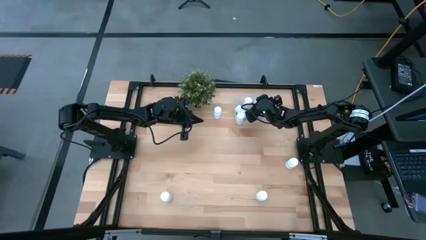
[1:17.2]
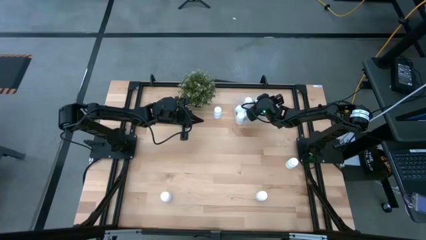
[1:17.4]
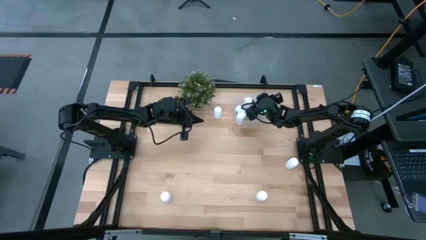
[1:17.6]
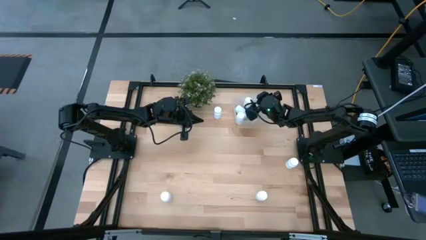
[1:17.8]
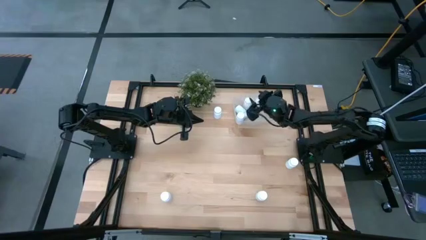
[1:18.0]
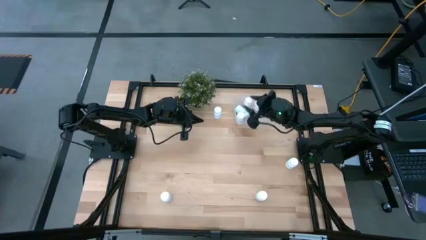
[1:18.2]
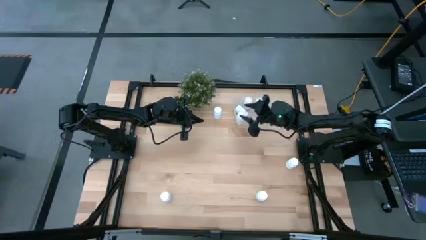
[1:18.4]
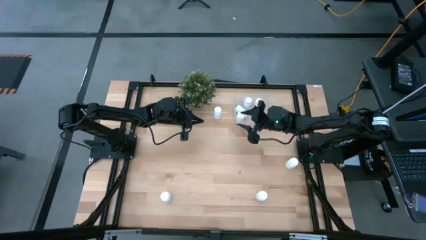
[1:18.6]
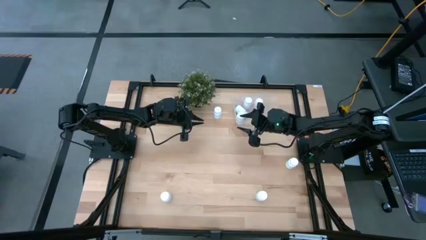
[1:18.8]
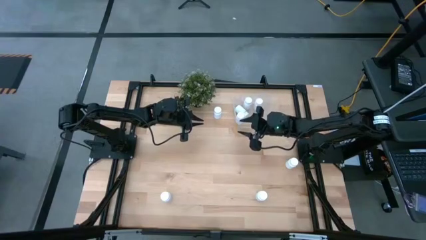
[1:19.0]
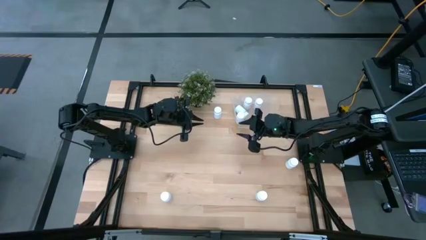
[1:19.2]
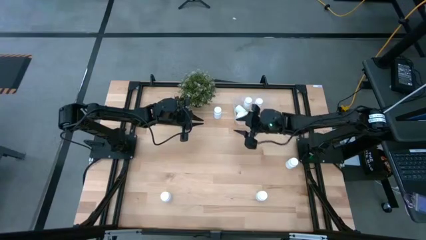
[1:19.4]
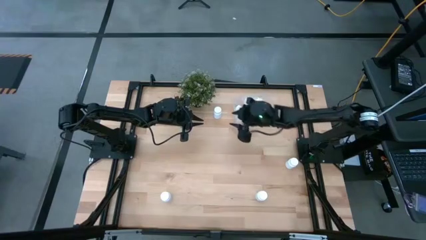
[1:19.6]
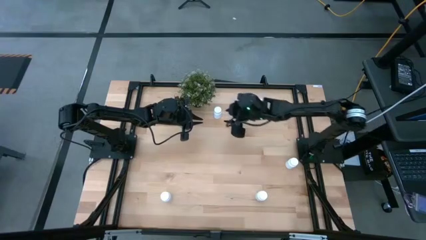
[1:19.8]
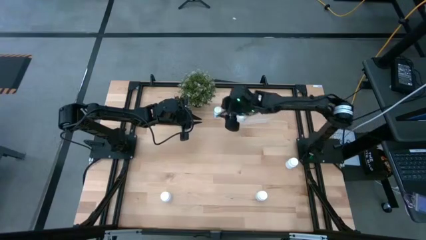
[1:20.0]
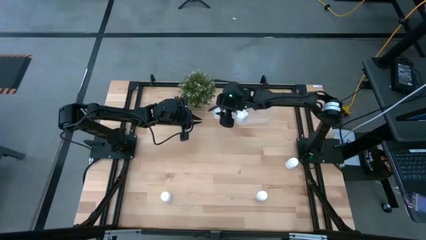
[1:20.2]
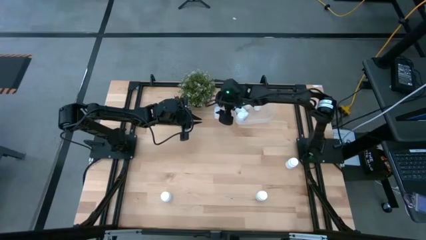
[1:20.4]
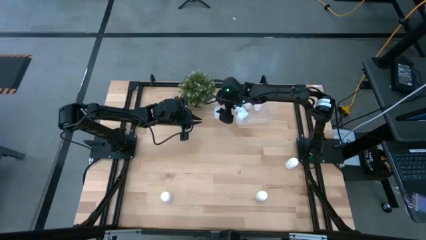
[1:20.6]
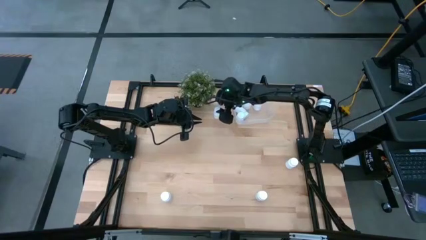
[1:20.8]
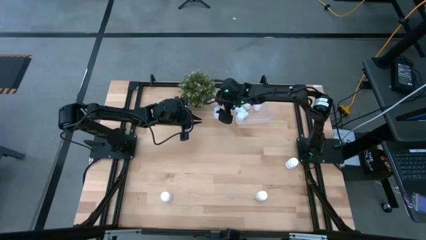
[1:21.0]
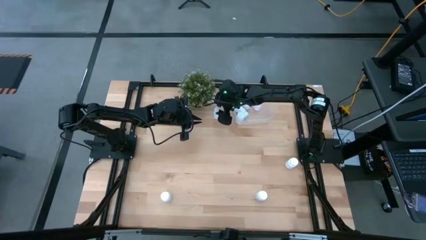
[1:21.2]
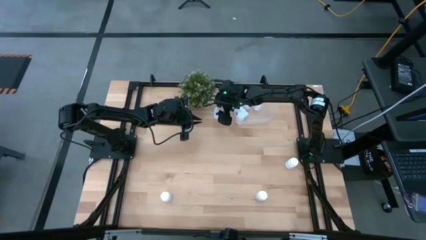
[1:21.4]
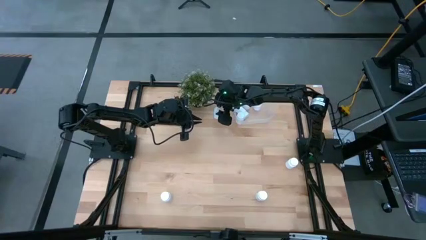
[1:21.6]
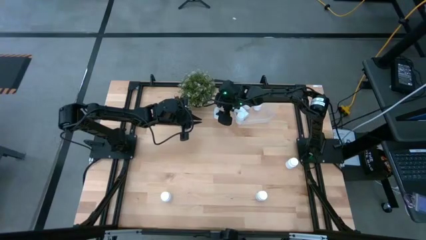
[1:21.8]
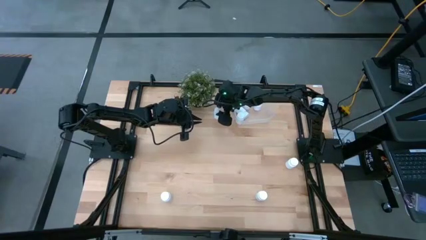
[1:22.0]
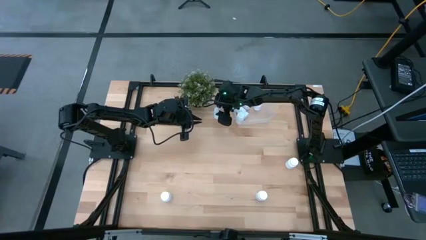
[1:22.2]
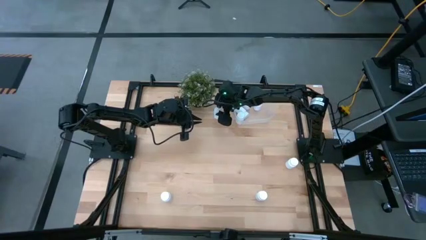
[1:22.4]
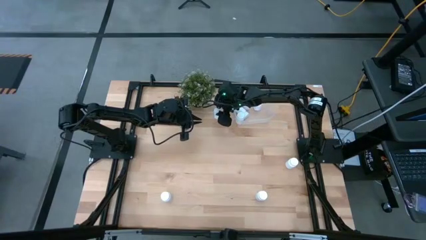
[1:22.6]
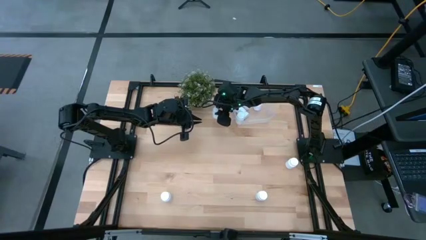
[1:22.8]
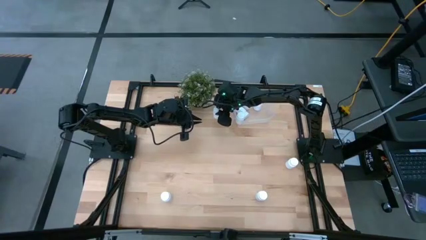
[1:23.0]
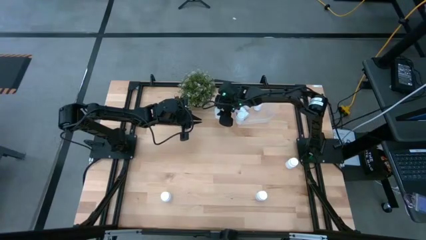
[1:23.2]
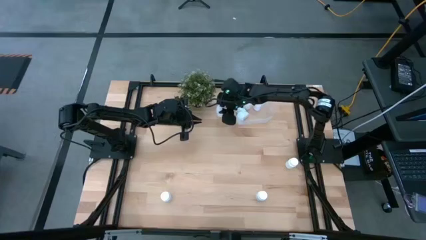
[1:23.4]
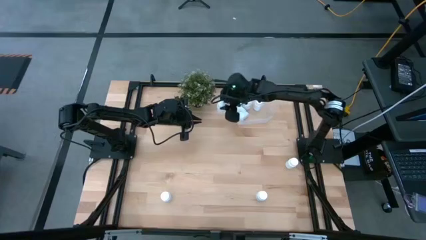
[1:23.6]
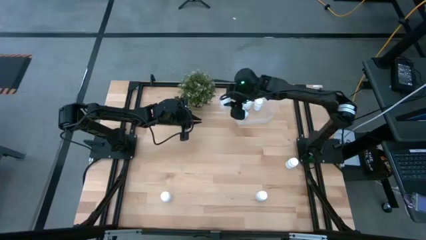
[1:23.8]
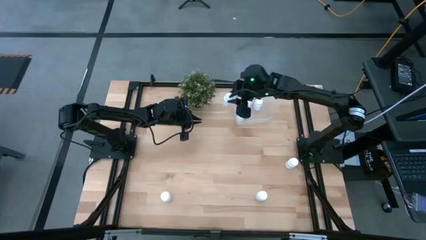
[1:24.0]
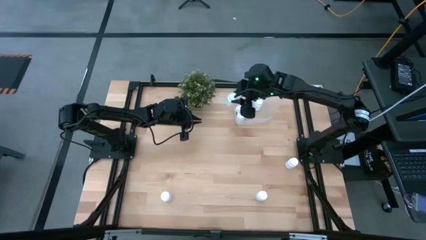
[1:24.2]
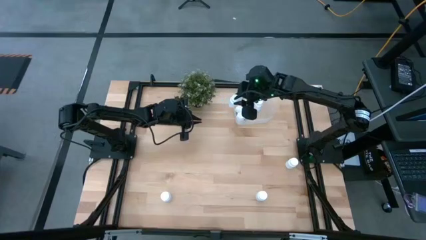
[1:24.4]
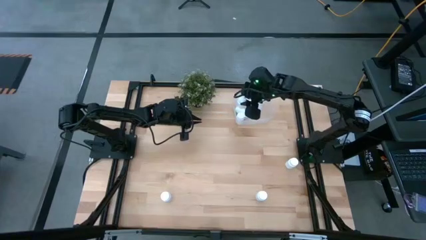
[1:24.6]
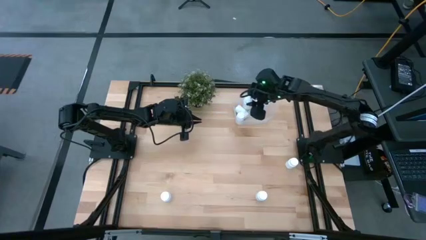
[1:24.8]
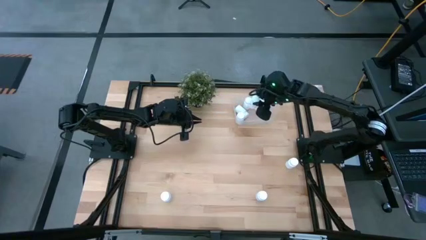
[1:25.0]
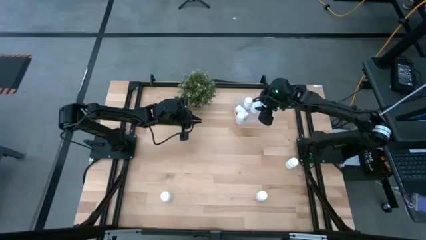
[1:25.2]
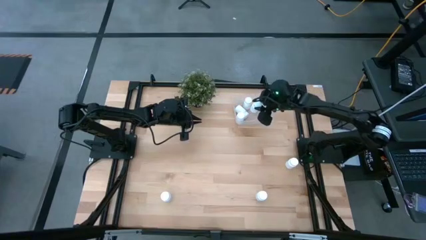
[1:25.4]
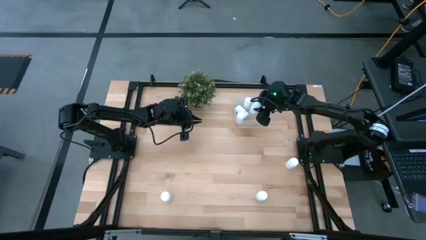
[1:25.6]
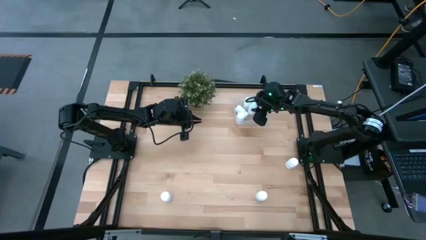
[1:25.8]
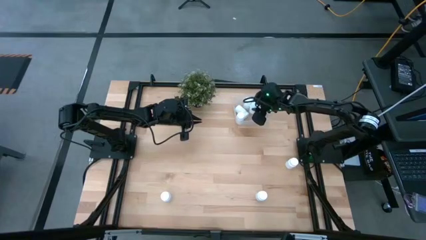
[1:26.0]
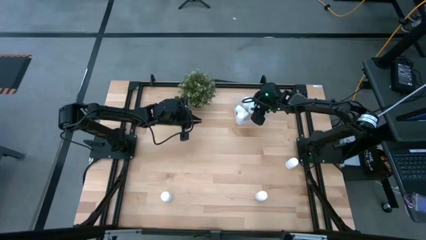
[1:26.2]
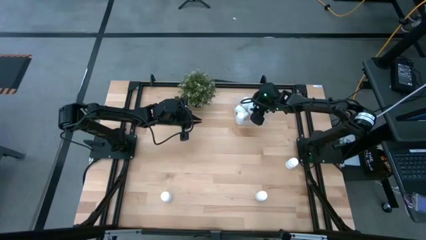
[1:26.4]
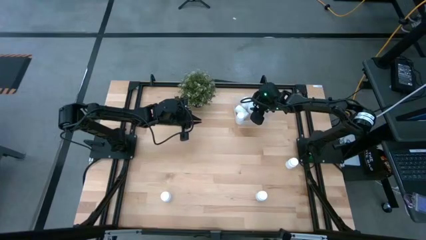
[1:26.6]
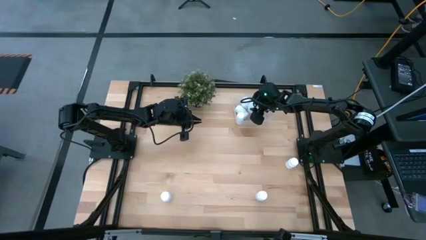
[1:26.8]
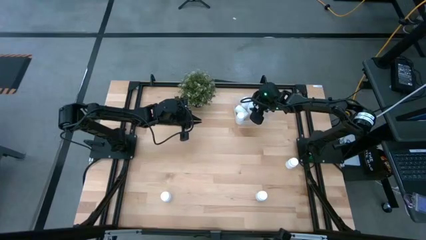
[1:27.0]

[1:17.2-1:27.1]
Task: Pick and place pill bottles into a basket
Put the white pill bottle into the transparent bin

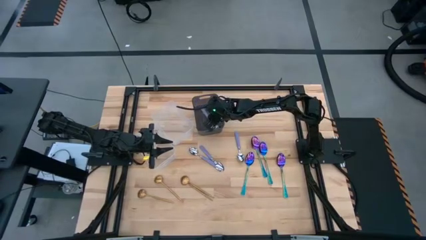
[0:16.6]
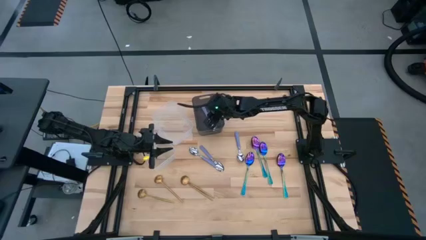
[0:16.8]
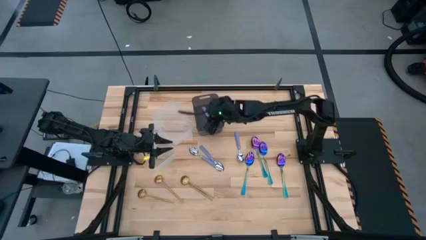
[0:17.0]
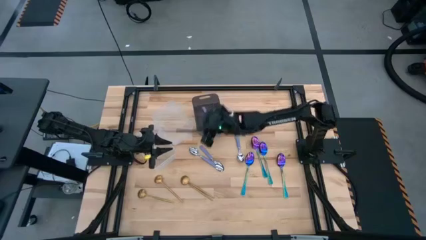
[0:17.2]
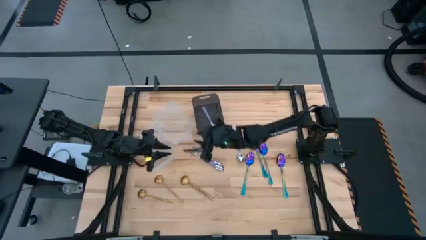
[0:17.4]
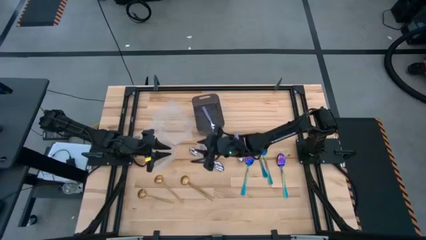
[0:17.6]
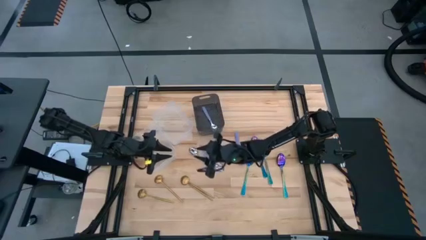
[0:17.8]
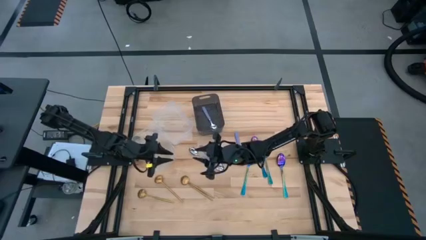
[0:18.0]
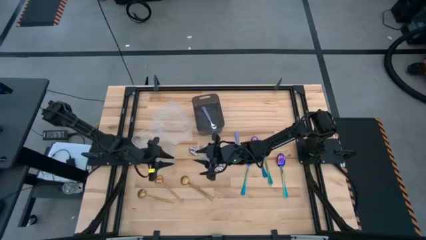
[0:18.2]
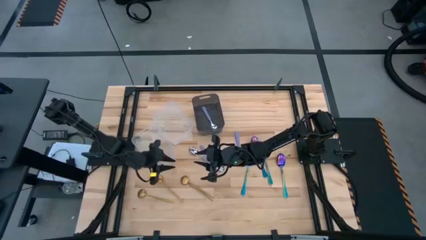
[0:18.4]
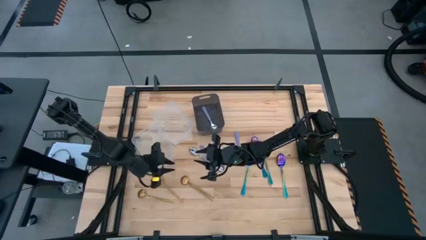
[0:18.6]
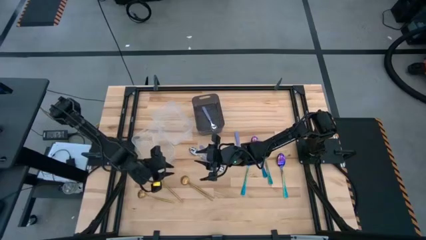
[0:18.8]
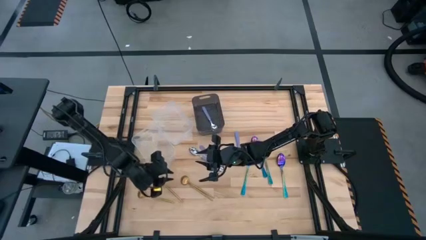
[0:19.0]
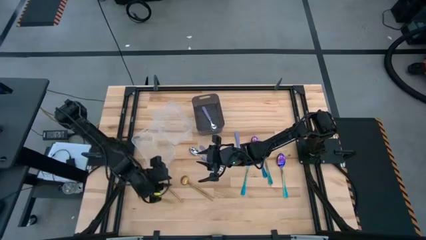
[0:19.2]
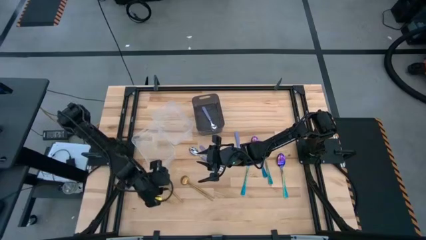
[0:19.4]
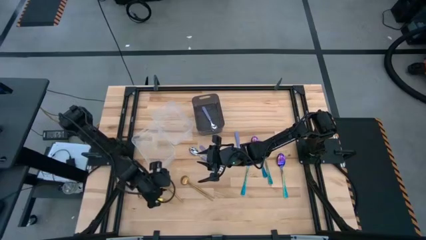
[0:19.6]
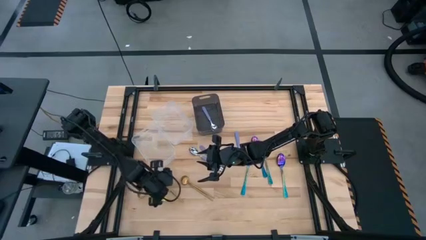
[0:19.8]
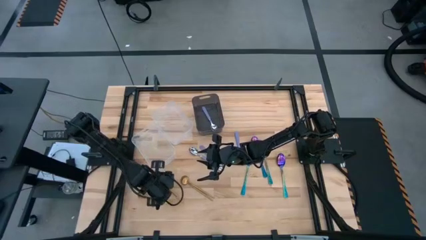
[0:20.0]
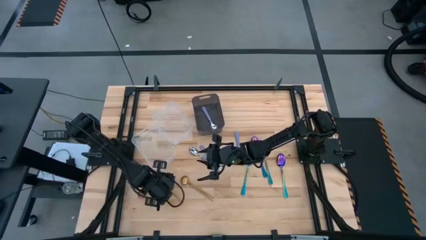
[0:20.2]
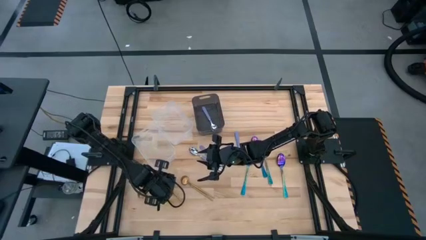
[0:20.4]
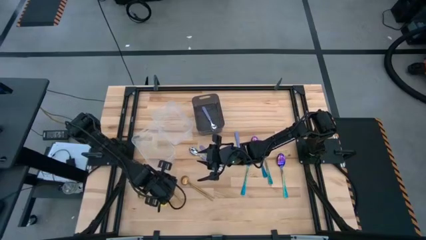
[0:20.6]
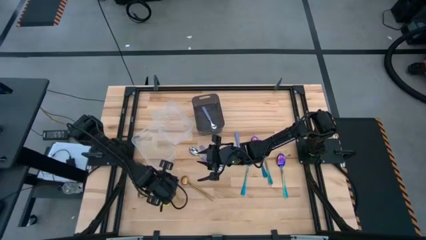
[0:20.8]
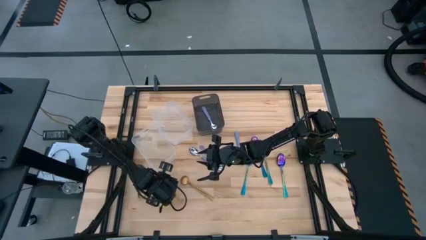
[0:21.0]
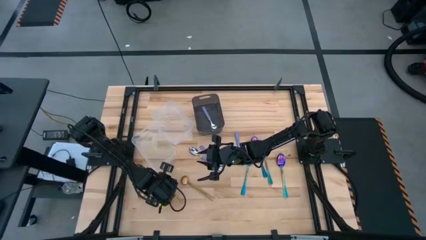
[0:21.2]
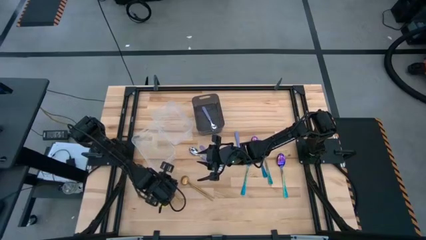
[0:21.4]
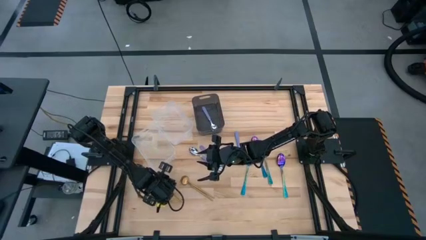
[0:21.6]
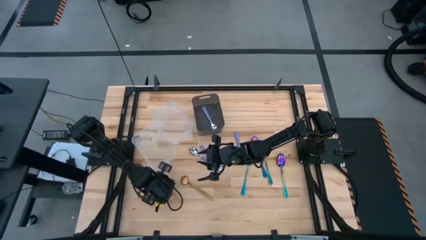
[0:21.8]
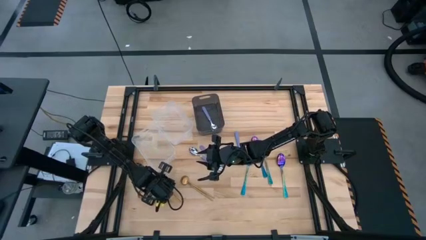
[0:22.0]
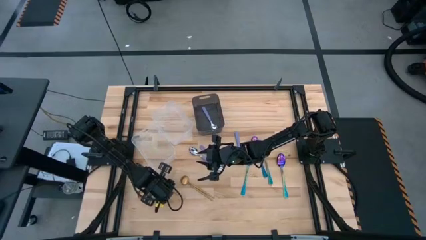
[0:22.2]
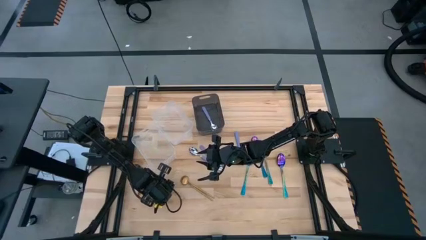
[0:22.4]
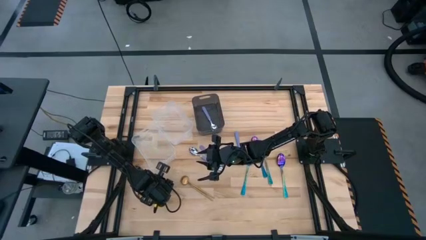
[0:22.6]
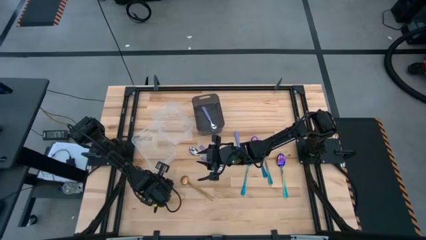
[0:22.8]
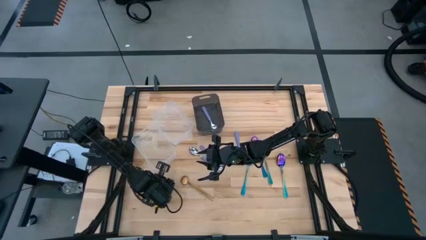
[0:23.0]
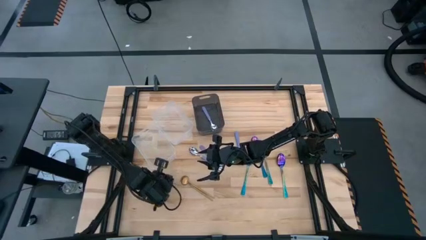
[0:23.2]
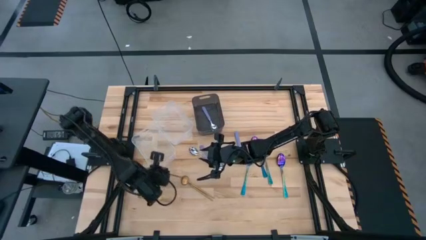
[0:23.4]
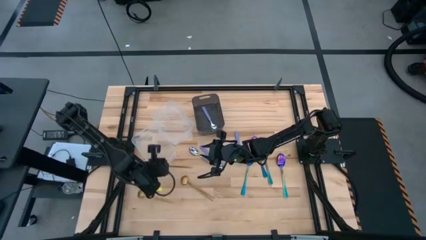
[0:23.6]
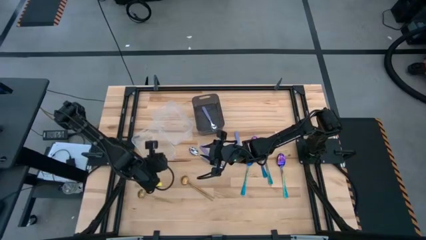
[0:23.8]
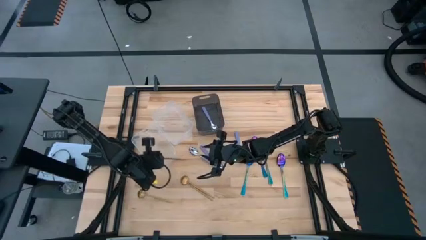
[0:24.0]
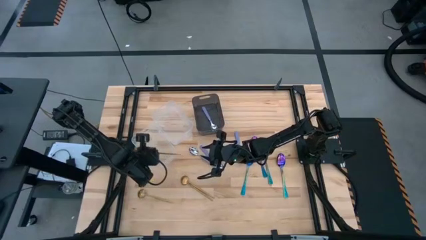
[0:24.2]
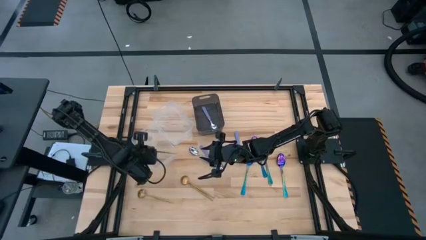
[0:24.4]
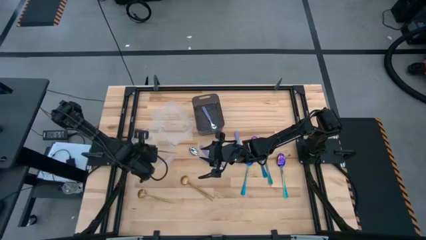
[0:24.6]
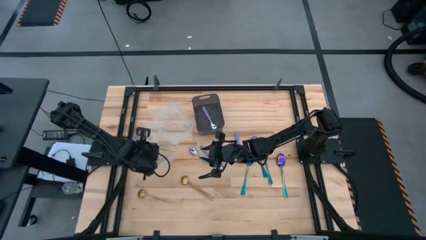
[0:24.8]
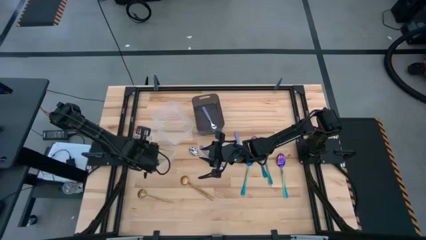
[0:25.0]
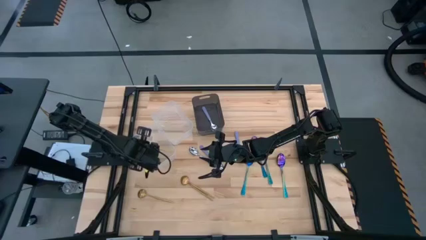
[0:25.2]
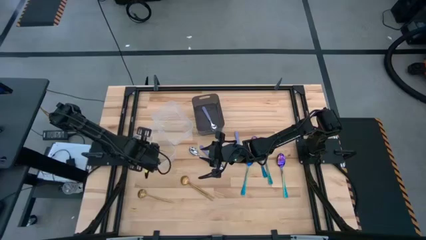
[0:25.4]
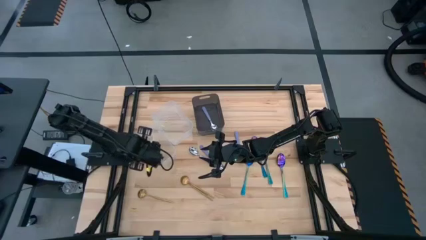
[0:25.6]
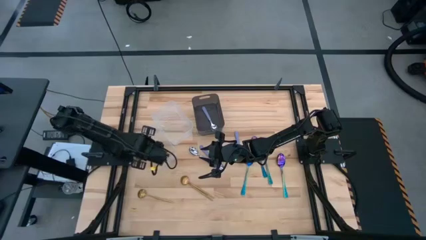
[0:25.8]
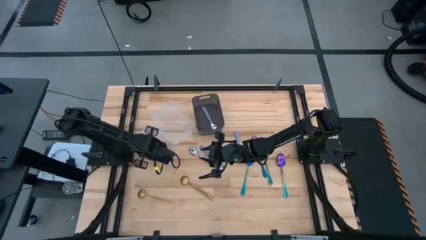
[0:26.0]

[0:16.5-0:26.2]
Task: Sort silverware by color (type)
Put the gold spoon into the bottom transparent bin
